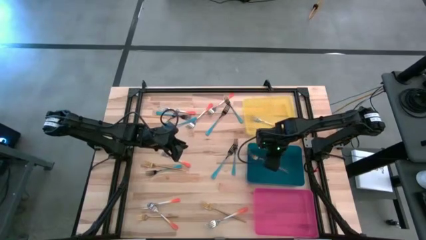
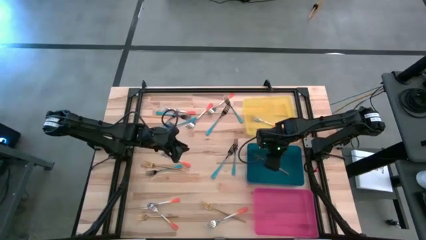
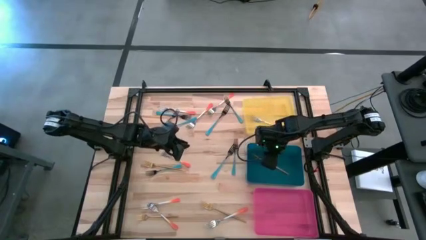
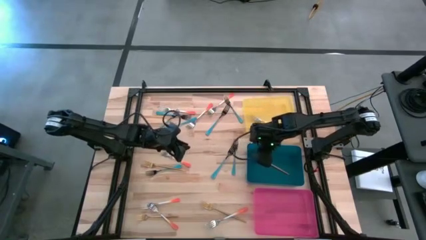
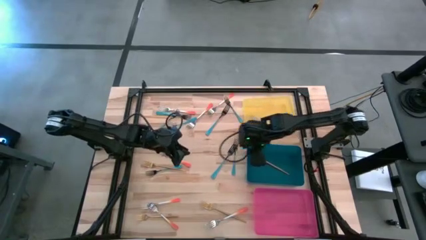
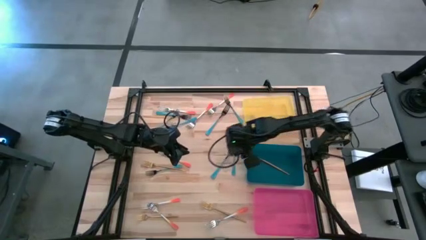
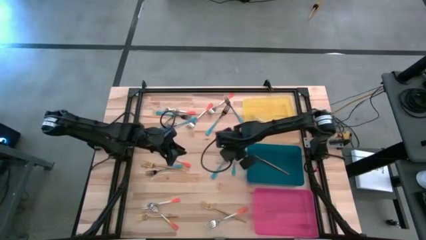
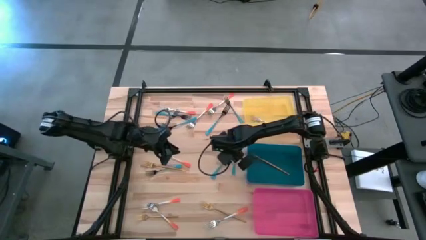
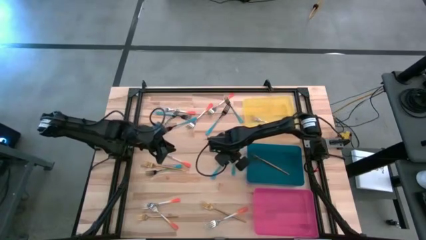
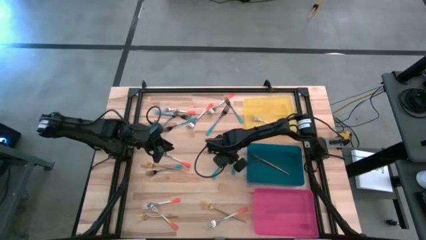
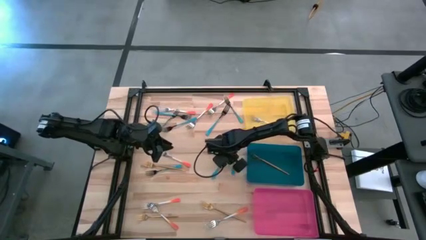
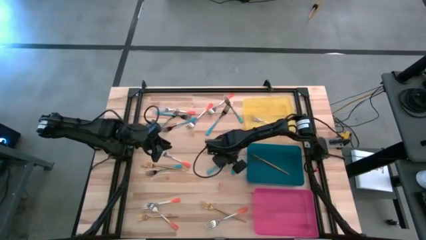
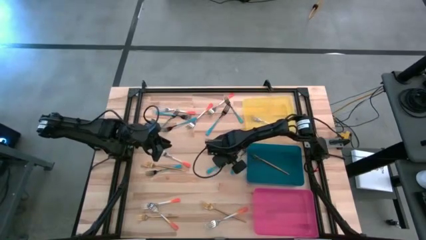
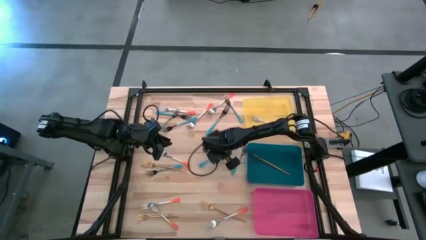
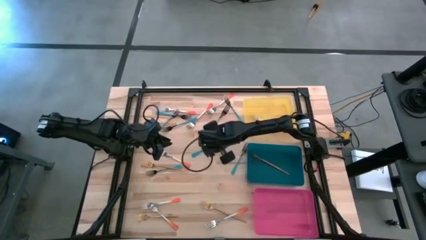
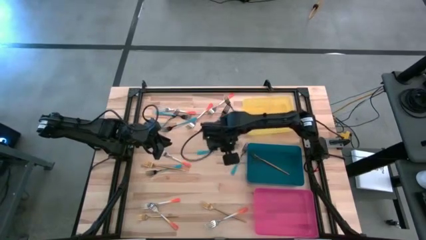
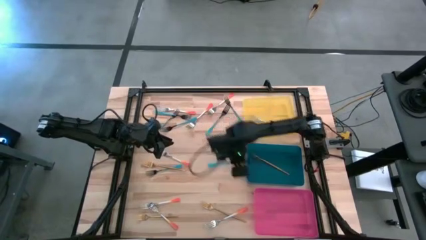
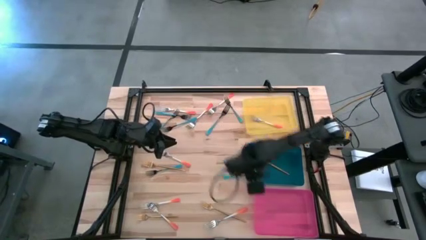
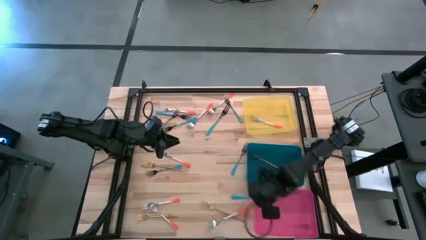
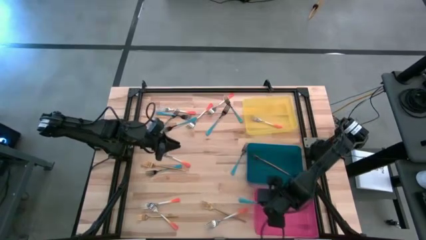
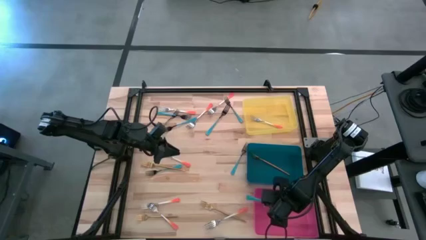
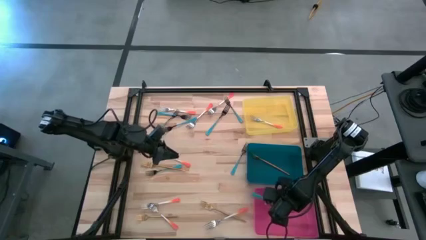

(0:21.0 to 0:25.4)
Task: Sort silverware by color (type)
Put the blue fork into the pink bin

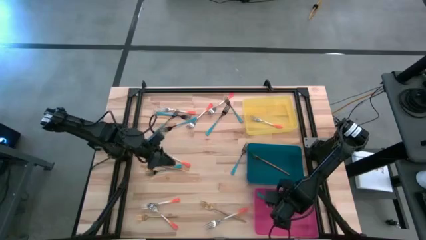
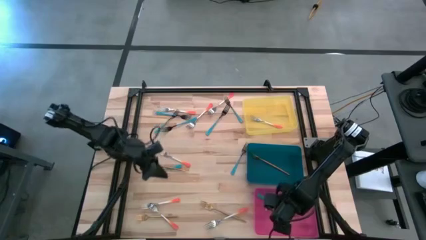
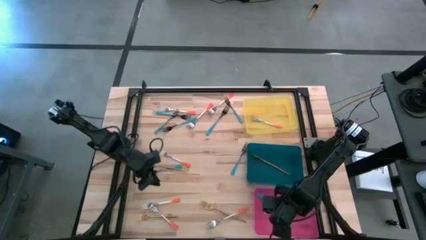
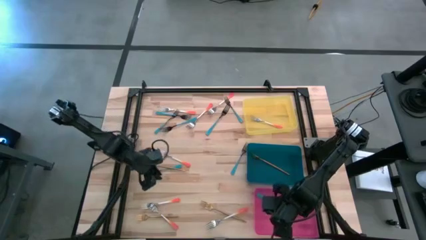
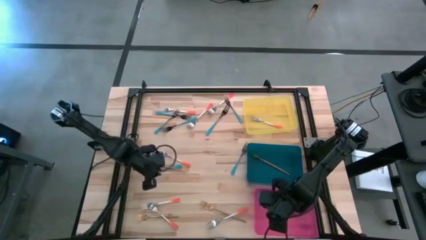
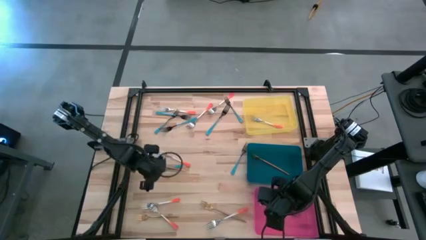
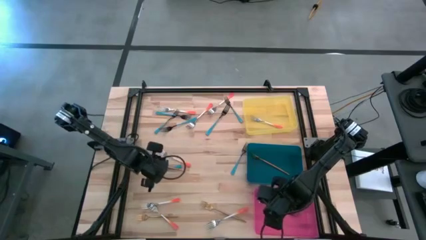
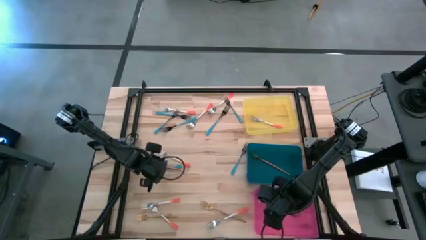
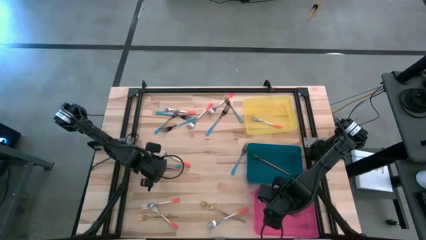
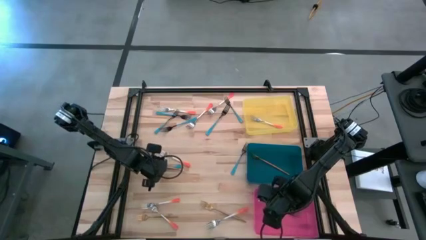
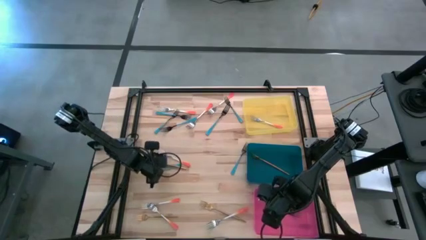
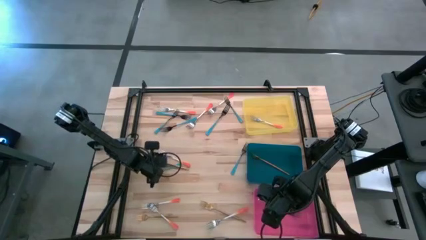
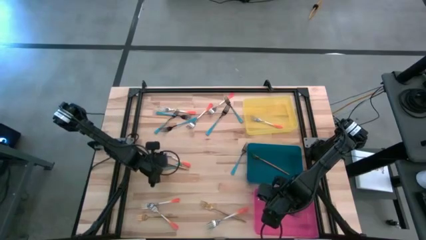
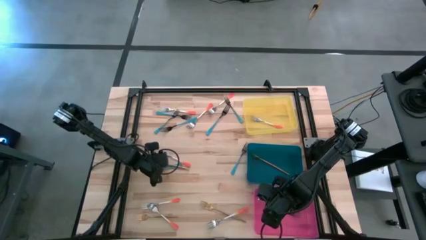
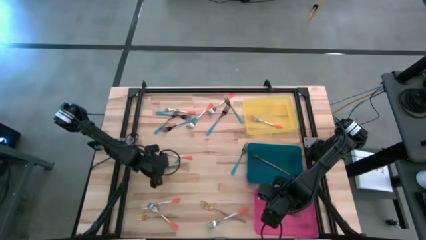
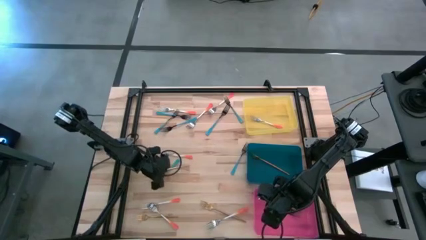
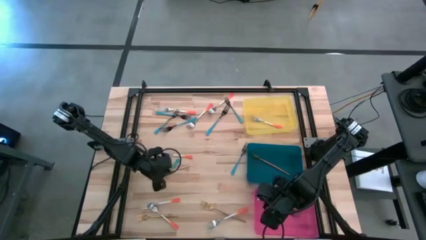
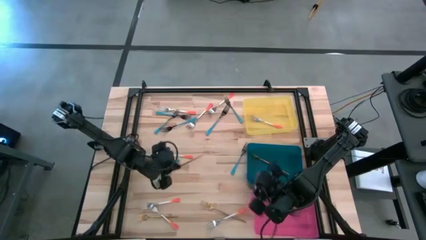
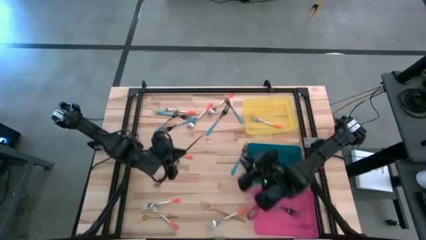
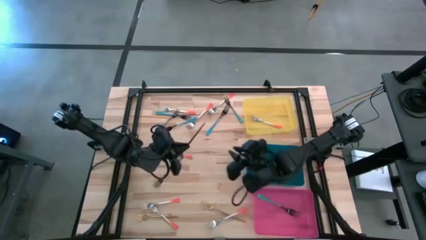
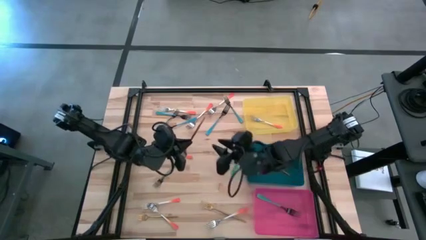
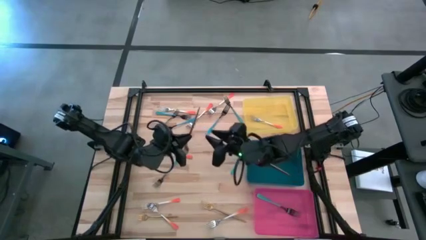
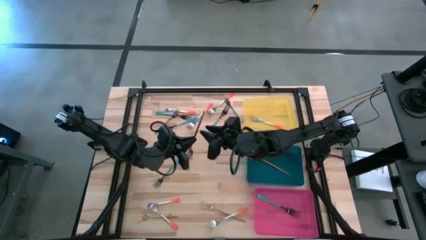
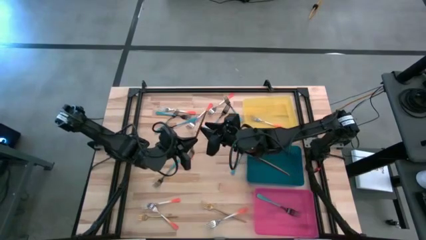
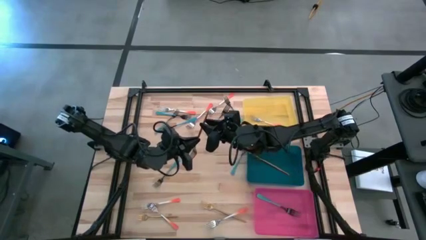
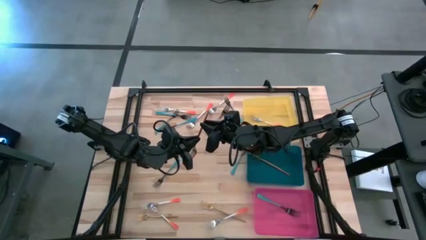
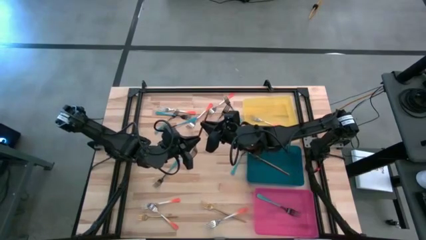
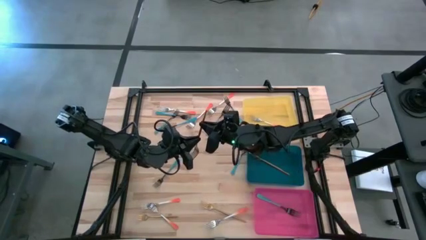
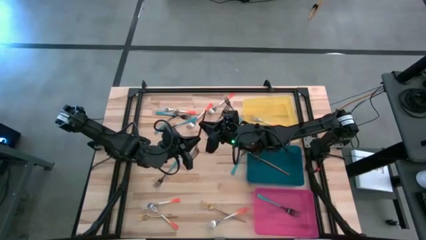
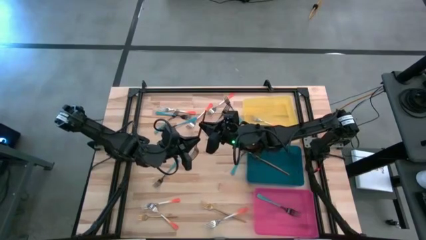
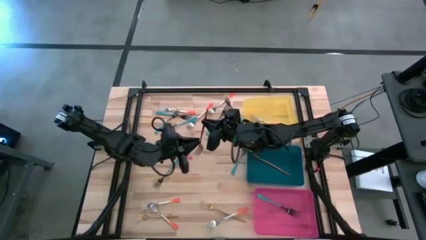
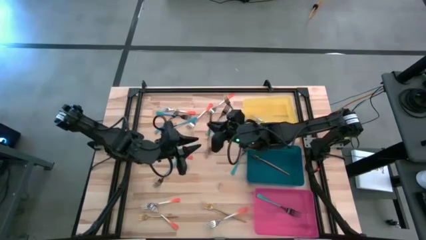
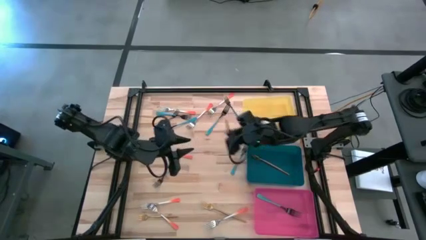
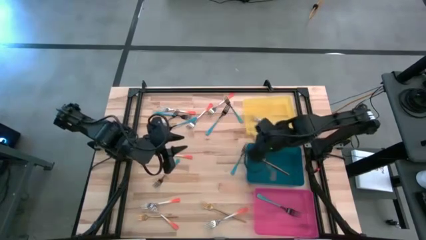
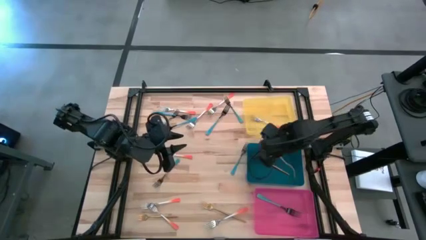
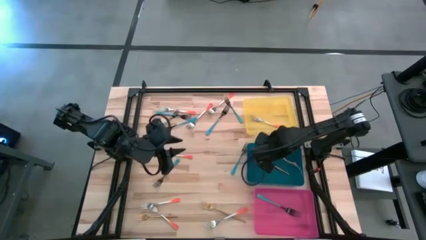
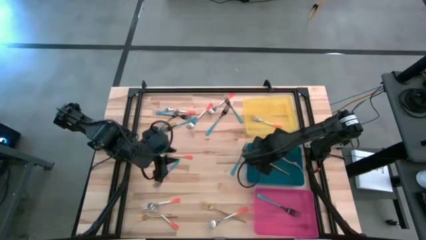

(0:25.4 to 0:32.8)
Put the gold fork into the blue bin

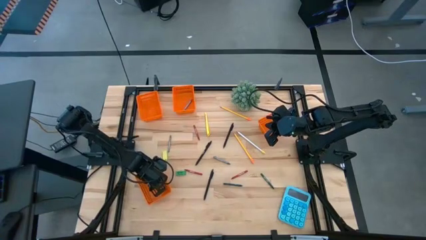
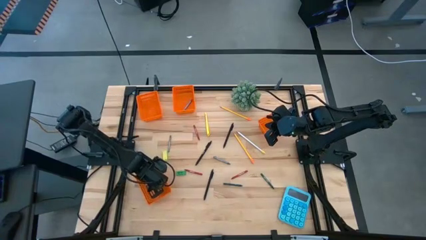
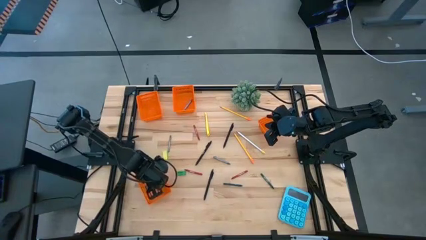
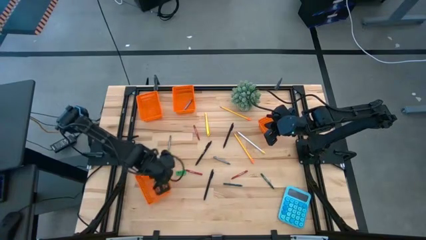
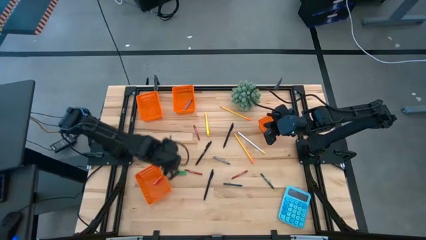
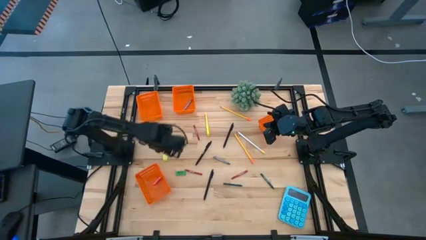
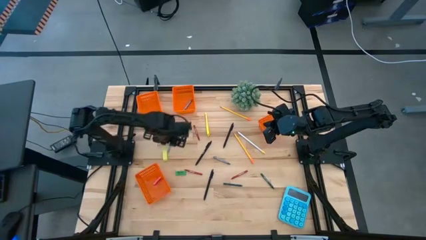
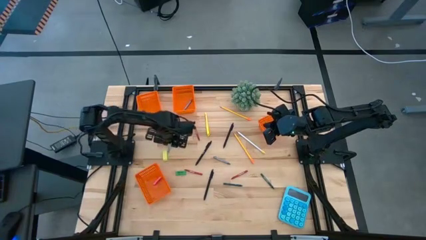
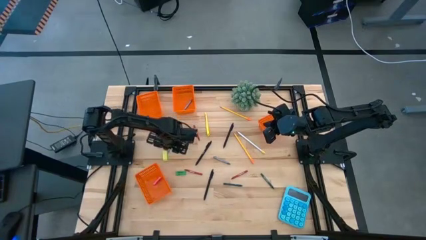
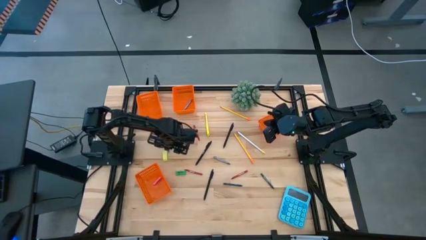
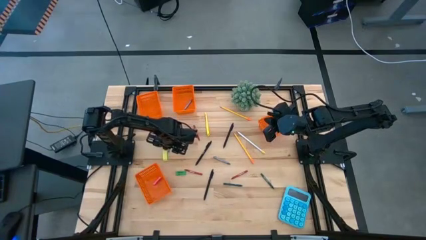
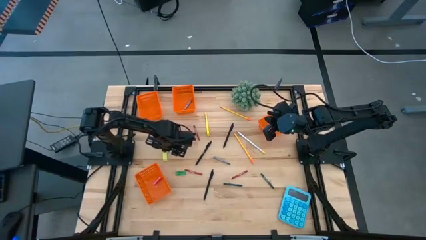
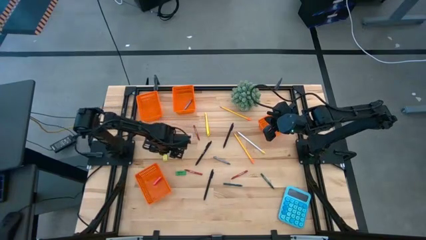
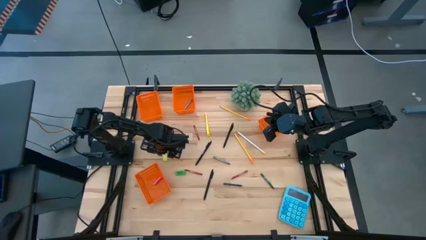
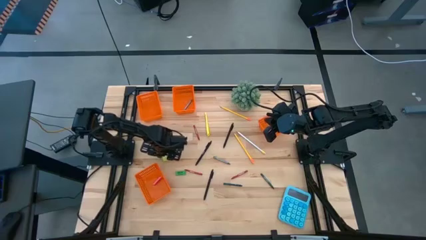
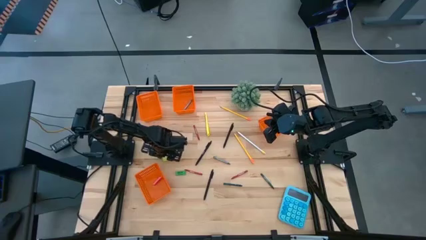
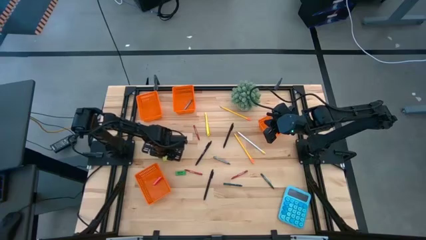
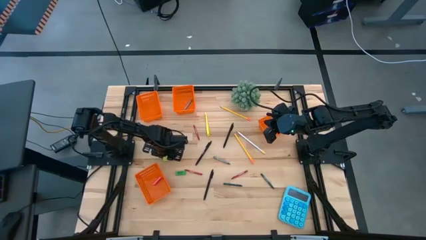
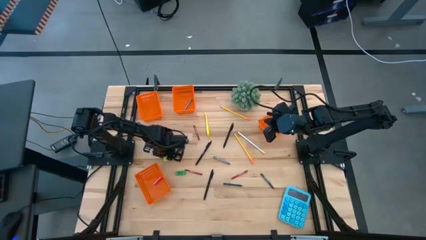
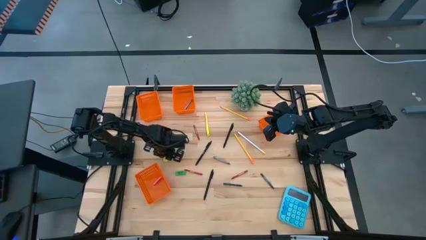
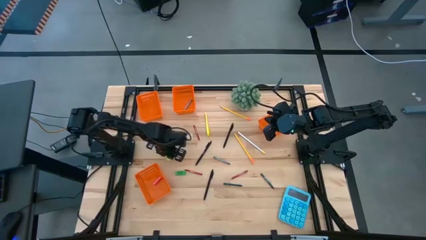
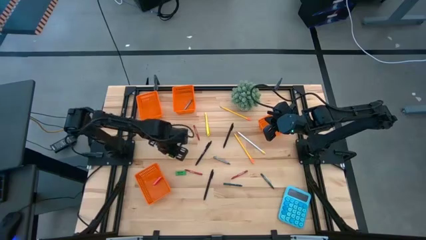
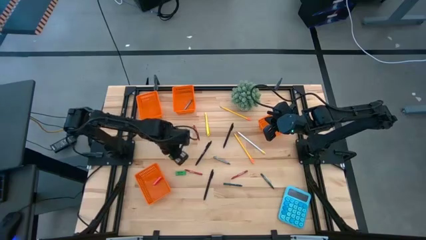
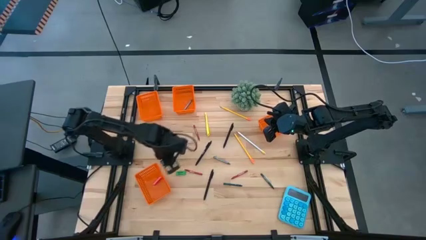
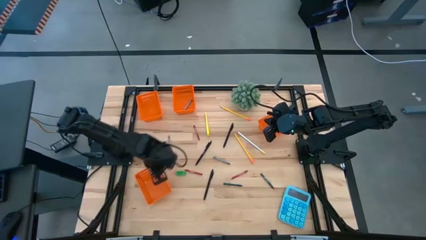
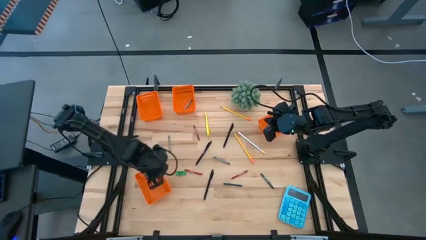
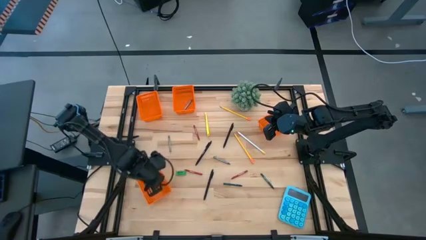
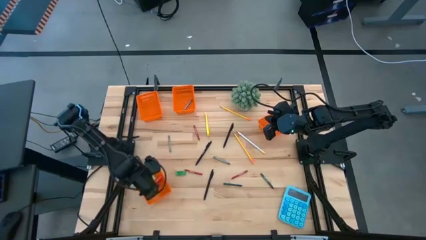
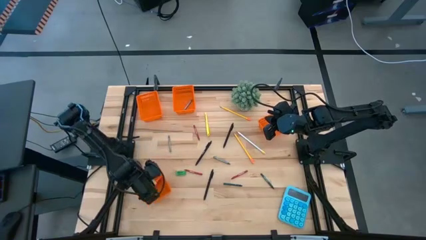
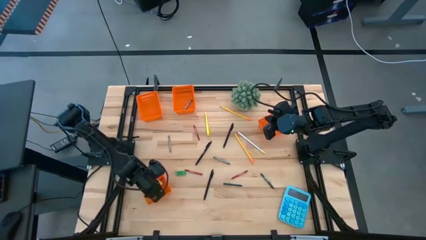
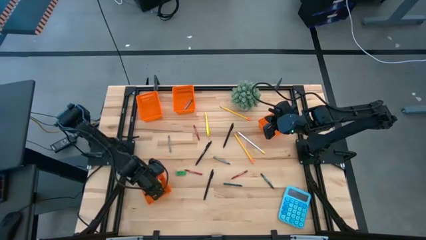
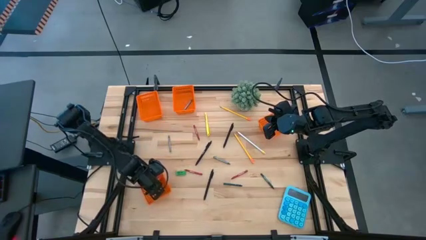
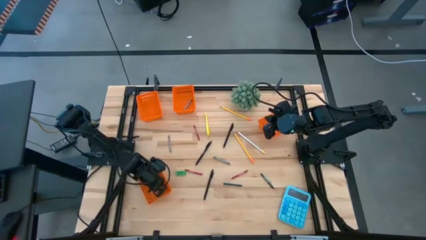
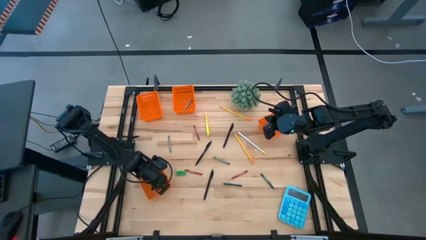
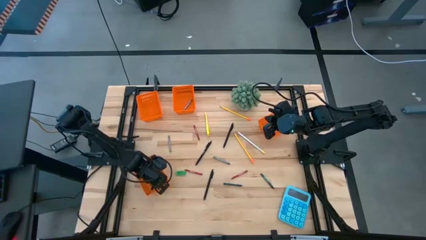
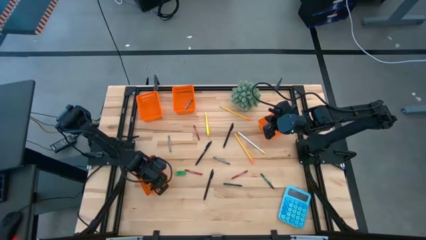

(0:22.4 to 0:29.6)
Task: Sort crayons/erasers/pens/pencils in bins
Put the yellow eraser into the bottom orange bin
